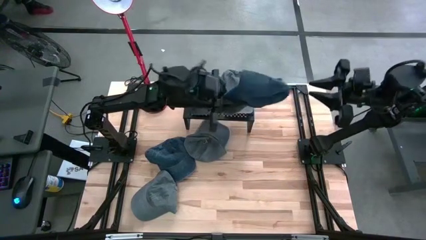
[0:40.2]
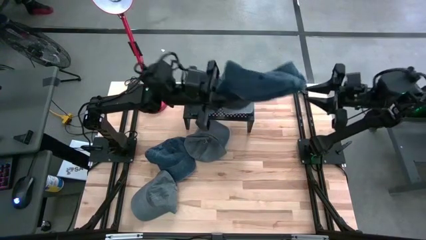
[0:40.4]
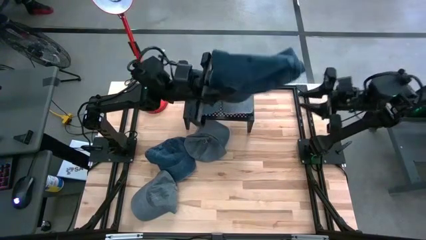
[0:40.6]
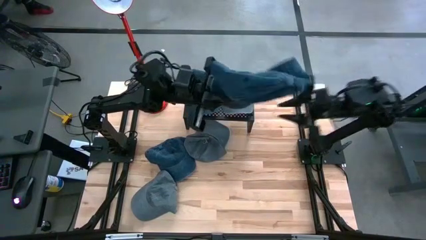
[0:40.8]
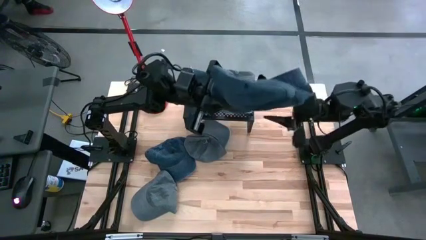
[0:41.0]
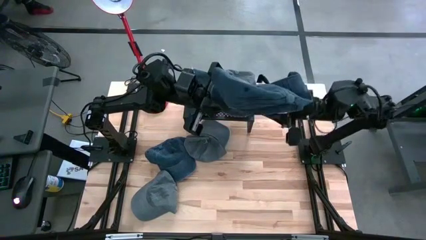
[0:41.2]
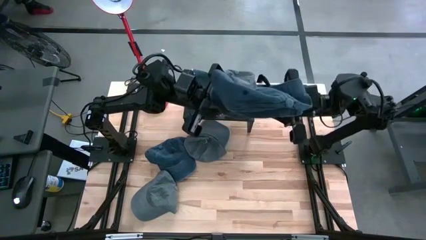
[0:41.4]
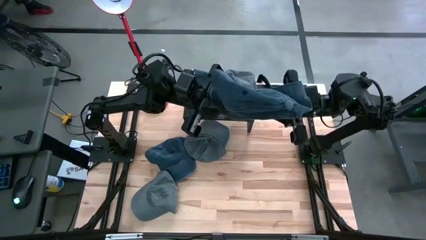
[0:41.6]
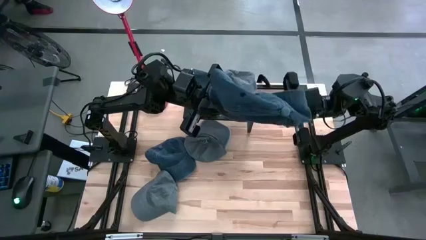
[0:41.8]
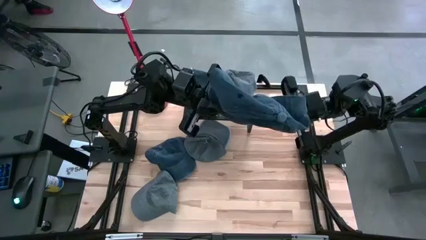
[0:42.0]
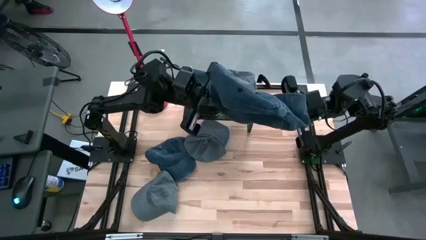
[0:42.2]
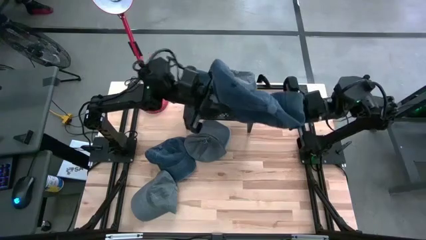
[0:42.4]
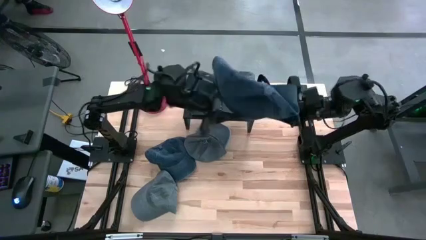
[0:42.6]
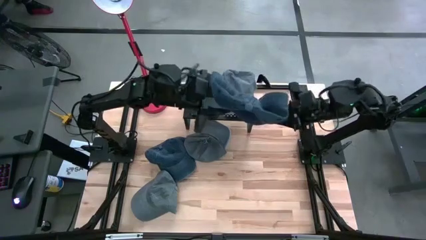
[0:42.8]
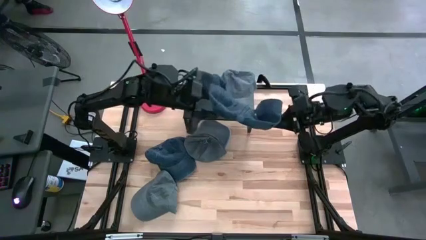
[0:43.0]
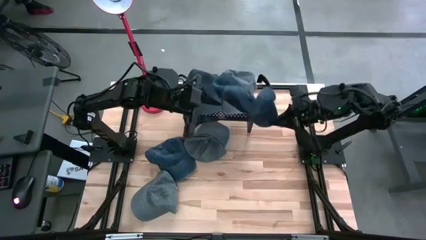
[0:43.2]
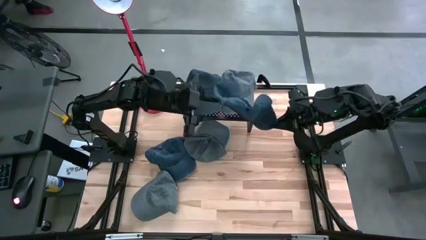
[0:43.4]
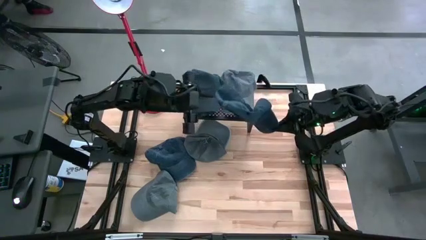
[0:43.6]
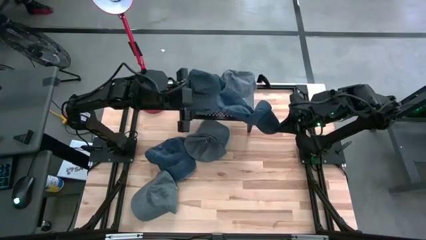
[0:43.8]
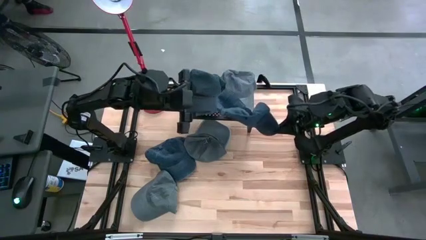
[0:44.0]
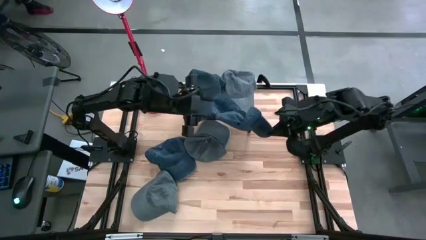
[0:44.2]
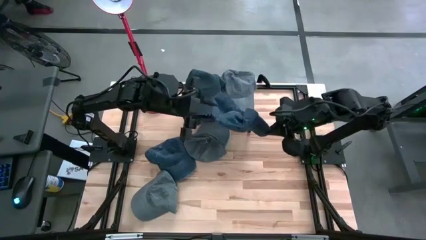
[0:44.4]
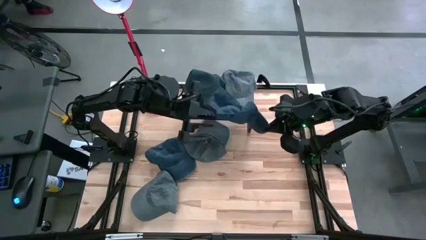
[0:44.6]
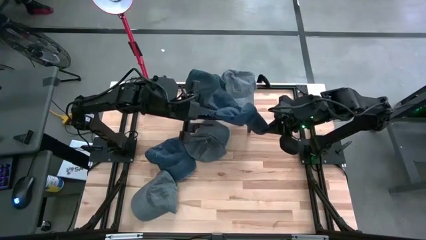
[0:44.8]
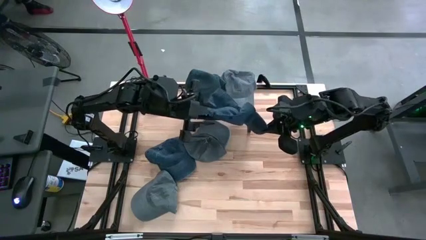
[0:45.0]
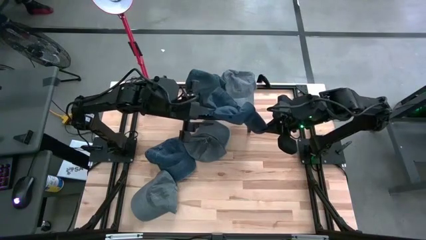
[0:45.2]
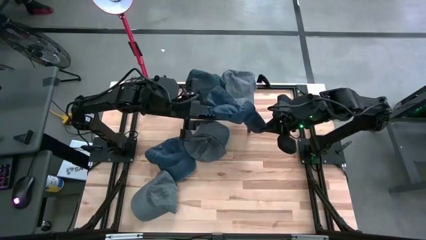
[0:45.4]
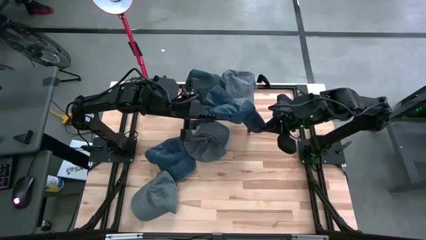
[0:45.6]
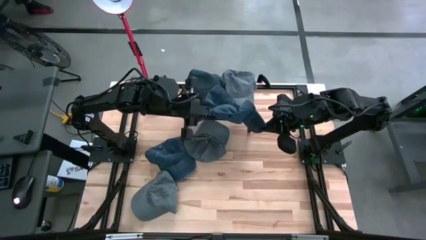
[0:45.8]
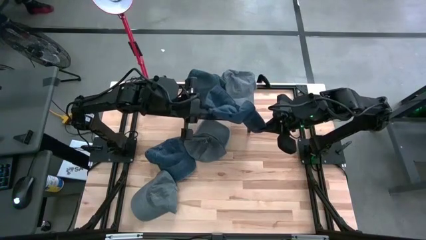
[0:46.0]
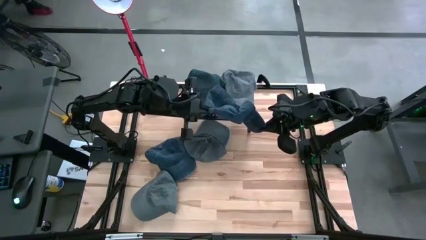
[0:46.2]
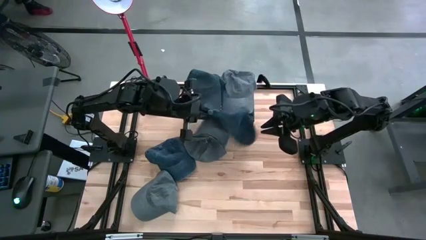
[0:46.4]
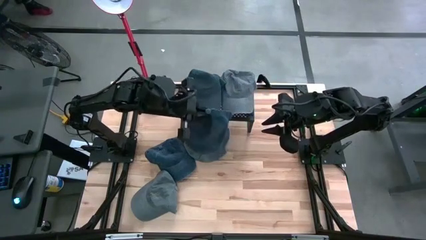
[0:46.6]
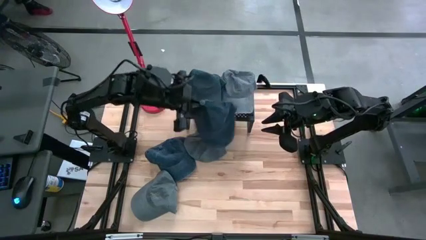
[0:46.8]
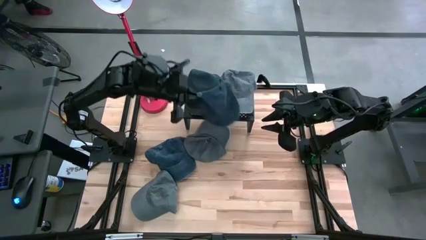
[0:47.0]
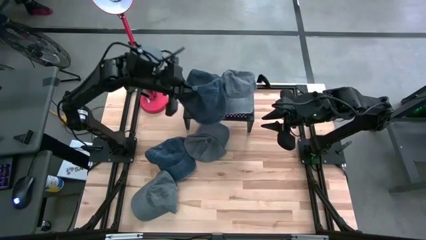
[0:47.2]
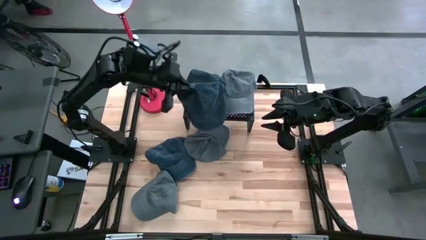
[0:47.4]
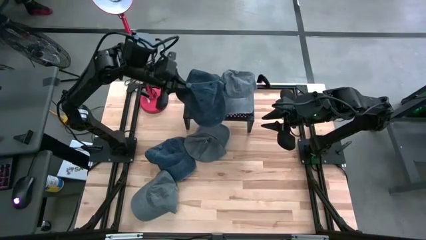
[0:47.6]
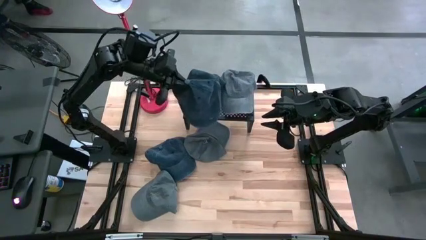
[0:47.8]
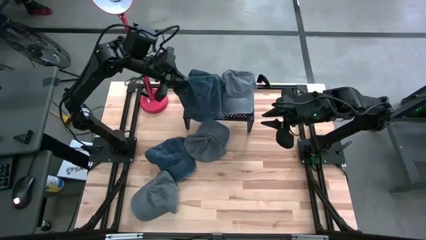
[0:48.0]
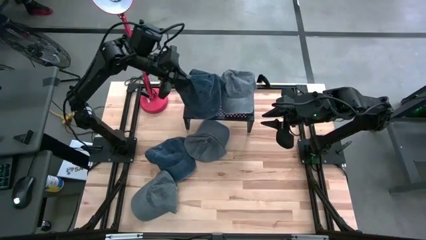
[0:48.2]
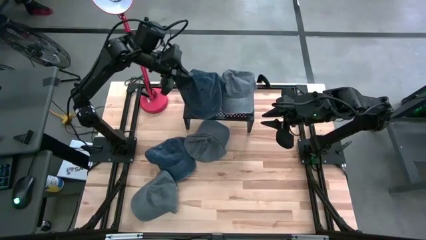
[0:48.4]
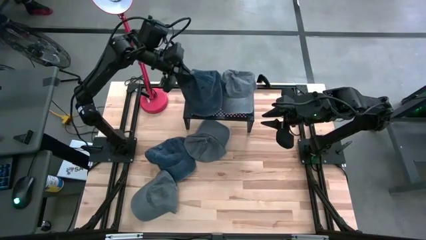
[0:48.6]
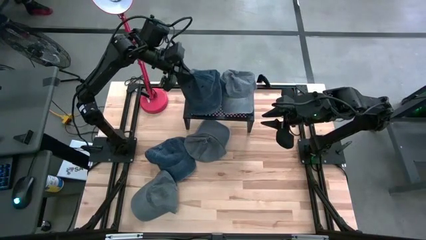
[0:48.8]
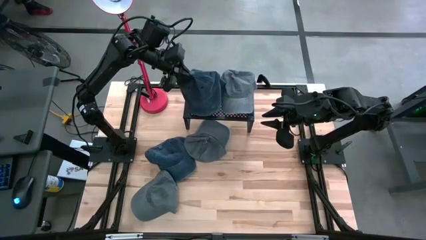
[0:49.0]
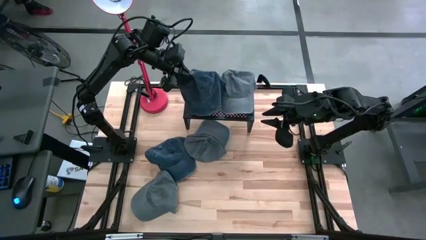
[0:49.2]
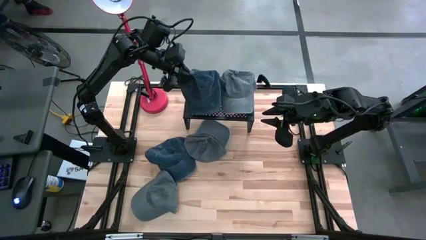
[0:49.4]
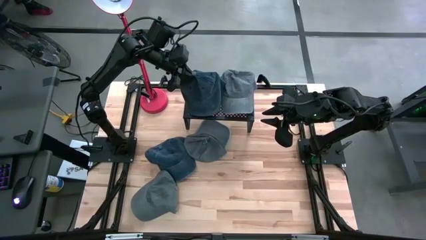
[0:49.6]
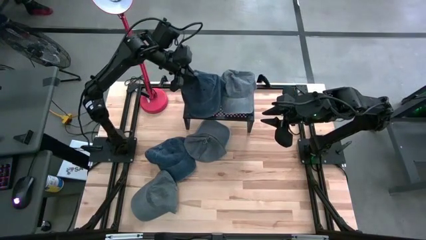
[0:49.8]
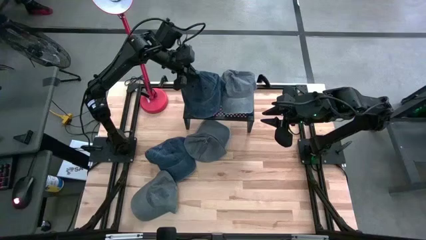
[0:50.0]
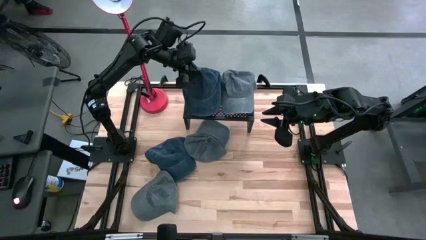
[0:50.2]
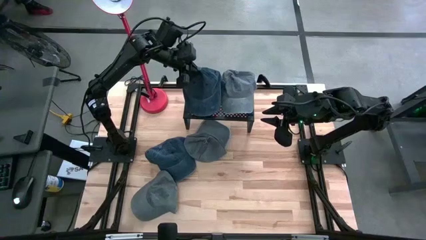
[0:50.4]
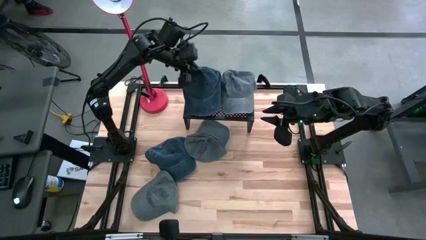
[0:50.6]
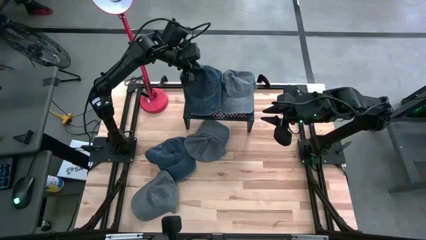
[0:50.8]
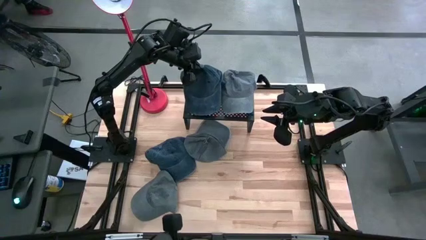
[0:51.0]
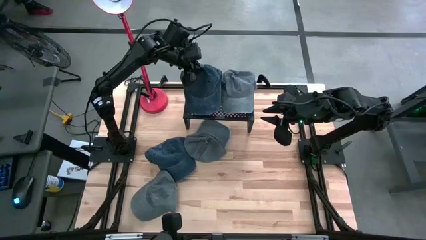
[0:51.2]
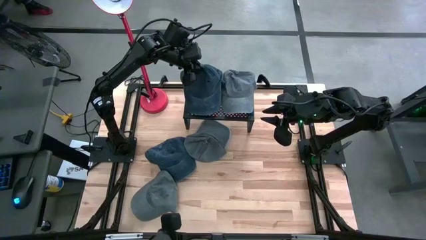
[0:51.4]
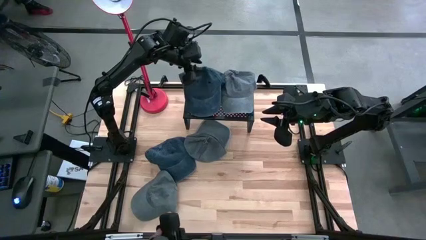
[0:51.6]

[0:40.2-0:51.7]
Task: Pick & Place hat
Stack the right blue cap on top of the blue cap on the shelf

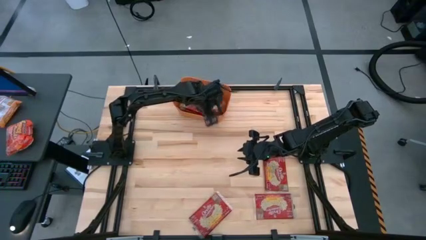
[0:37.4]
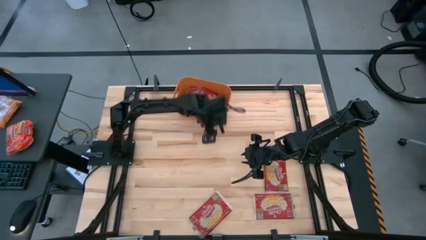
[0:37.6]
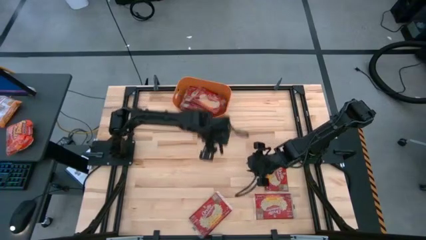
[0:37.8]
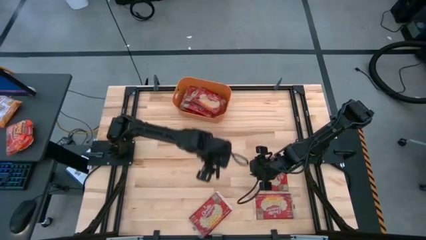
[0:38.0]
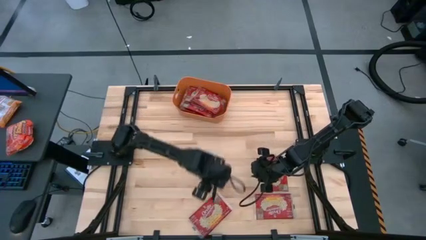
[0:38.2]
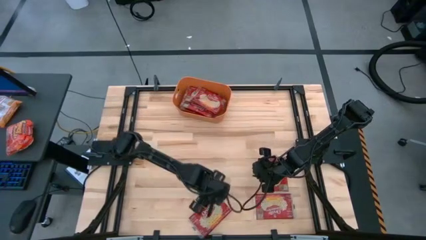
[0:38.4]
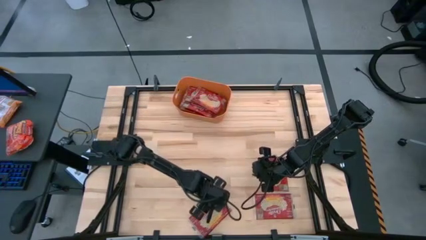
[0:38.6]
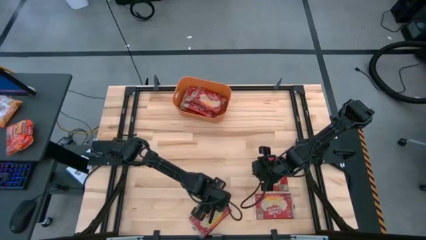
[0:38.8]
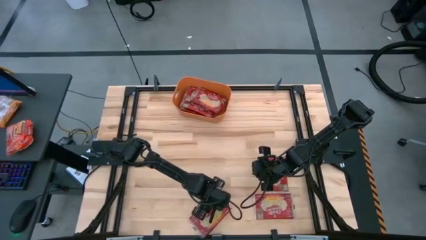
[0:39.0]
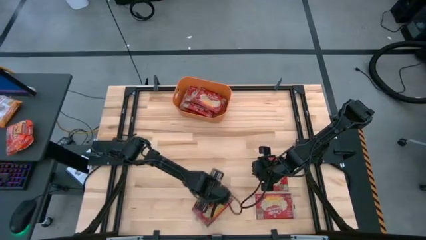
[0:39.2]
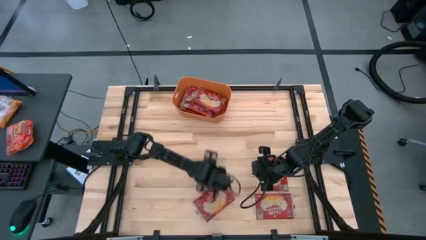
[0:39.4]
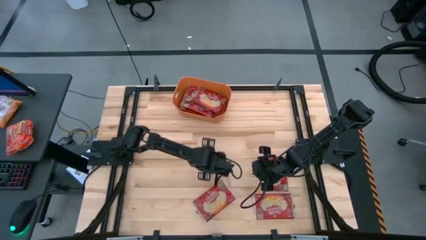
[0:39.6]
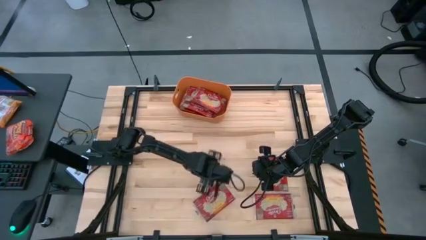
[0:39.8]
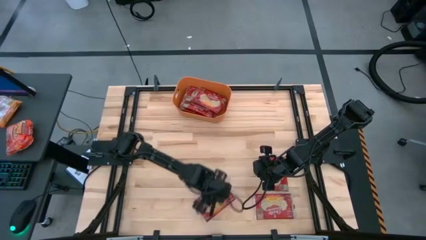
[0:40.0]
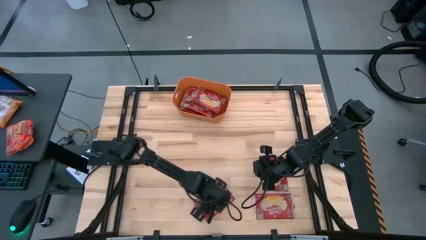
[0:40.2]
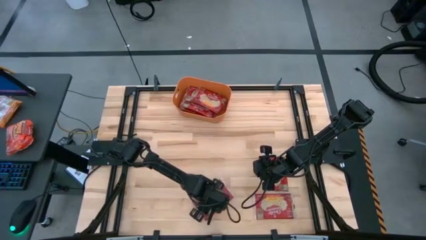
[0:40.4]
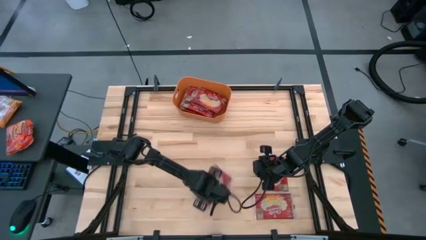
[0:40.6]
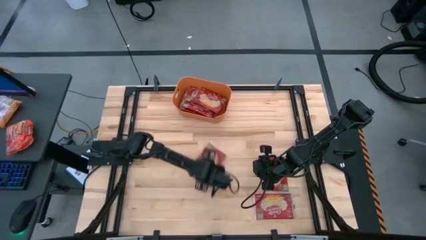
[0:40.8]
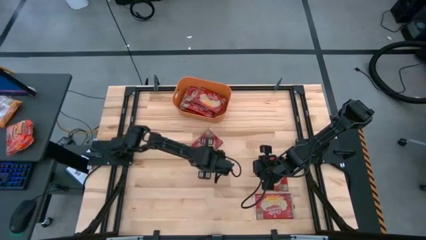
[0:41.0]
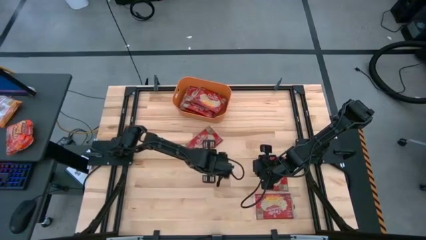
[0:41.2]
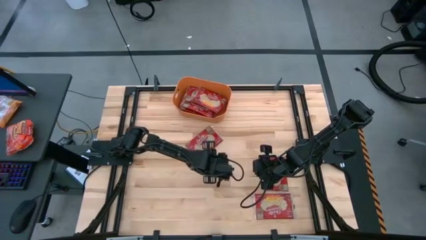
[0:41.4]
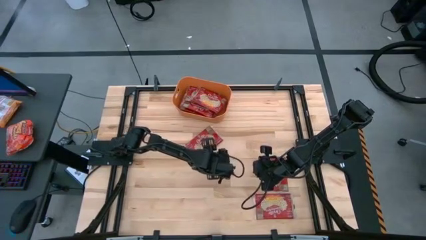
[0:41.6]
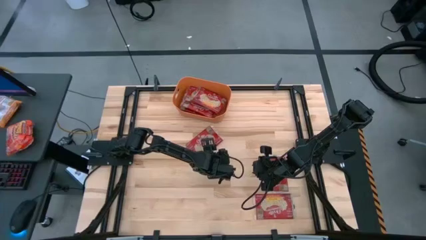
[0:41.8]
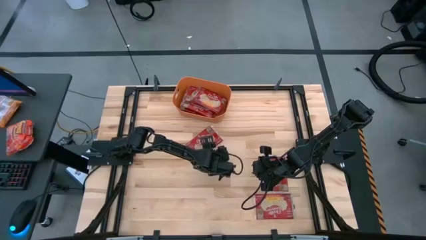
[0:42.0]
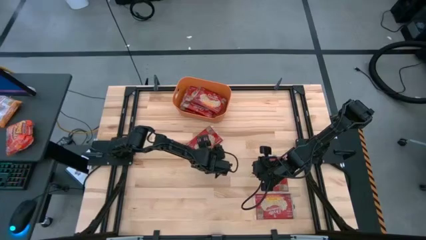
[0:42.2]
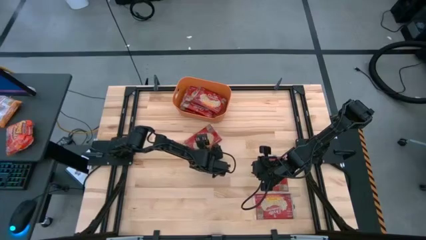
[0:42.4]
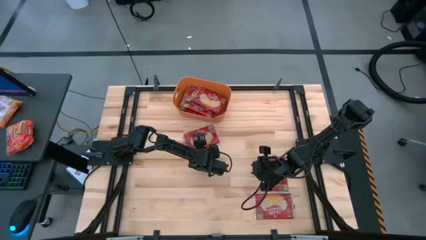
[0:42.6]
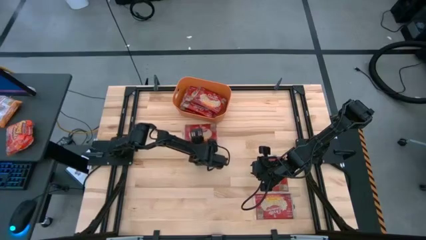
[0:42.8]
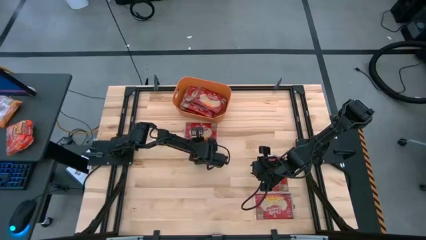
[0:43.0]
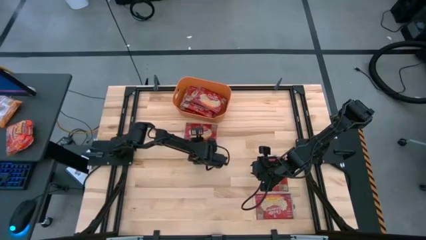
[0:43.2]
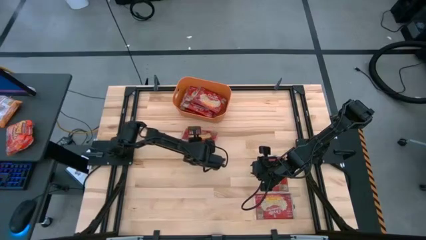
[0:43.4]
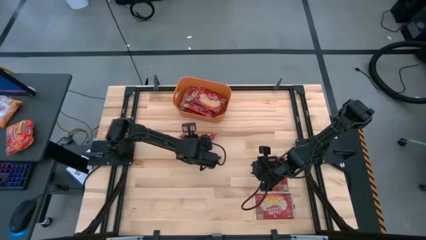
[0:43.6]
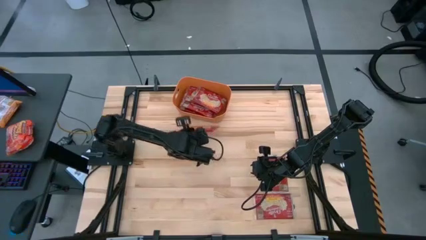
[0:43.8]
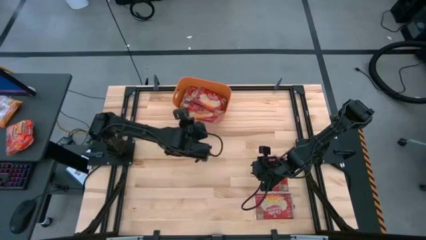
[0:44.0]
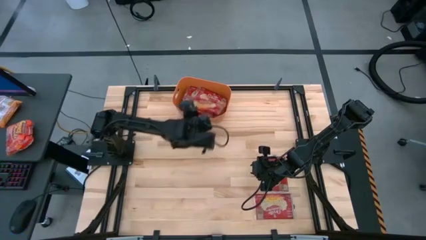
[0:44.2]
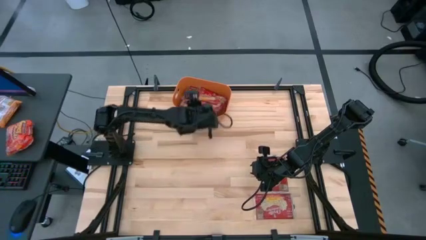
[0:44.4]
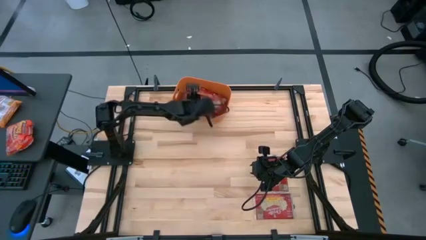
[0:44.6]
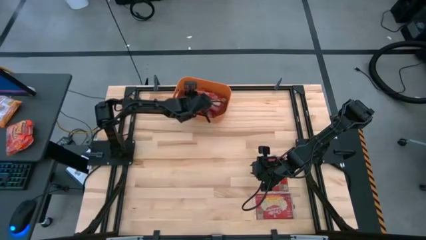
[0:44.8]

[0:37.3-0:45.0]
Task: Sort popcorn bags into baskets
Put the red popcorn bag into the orange bin
